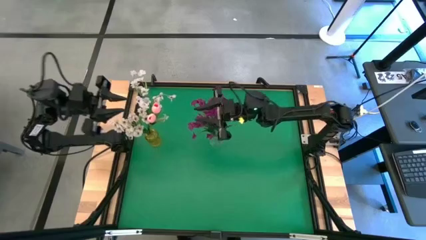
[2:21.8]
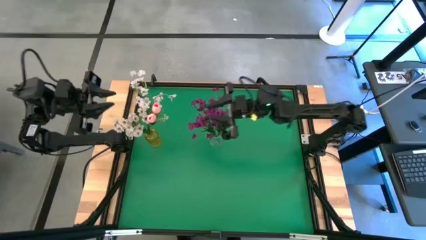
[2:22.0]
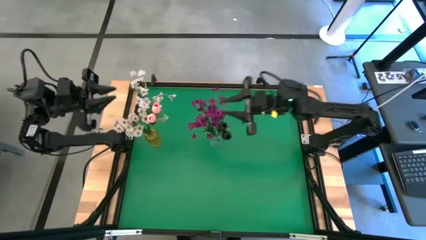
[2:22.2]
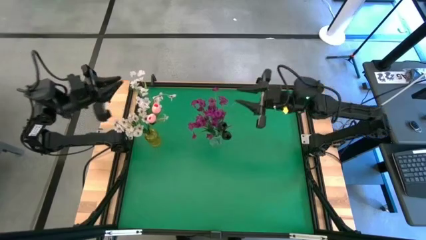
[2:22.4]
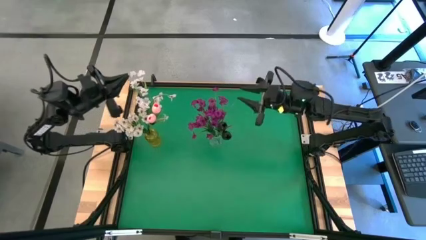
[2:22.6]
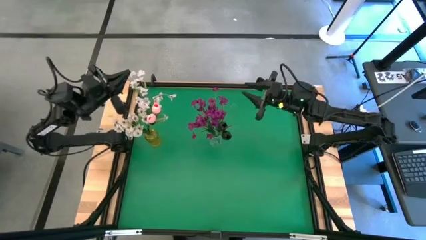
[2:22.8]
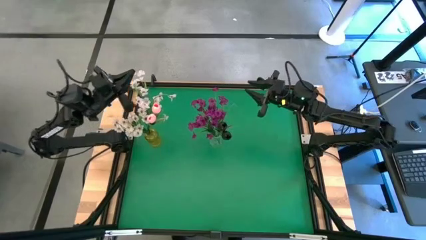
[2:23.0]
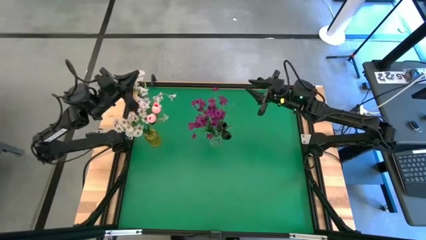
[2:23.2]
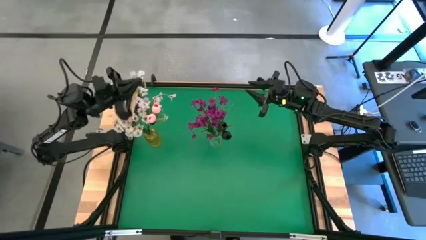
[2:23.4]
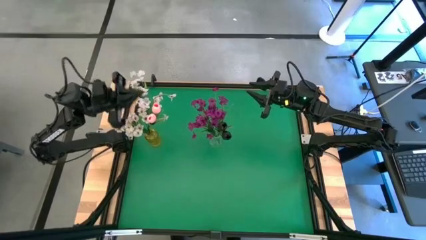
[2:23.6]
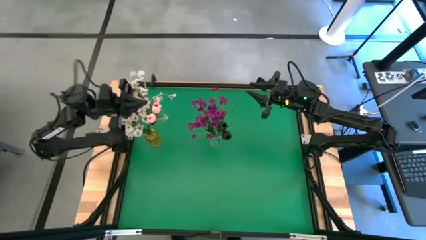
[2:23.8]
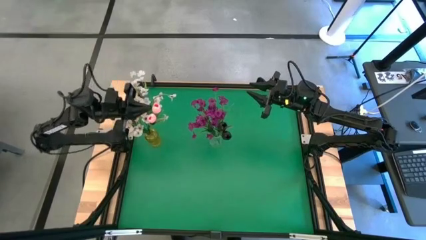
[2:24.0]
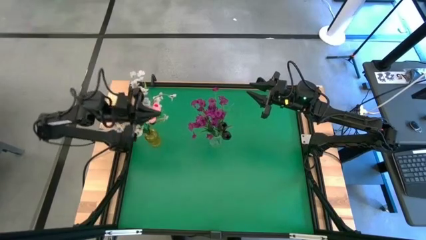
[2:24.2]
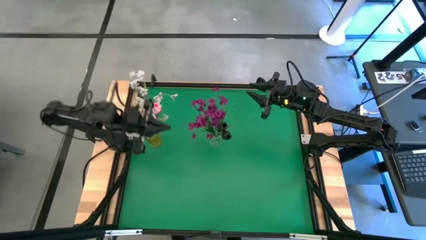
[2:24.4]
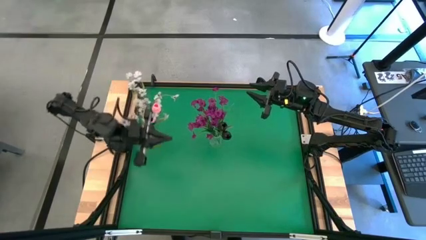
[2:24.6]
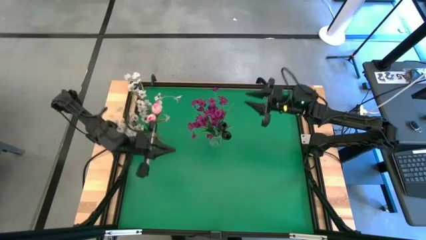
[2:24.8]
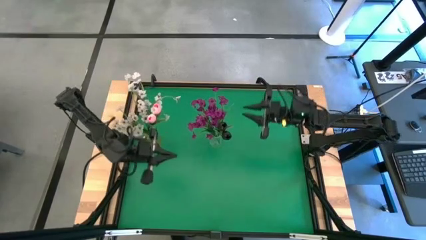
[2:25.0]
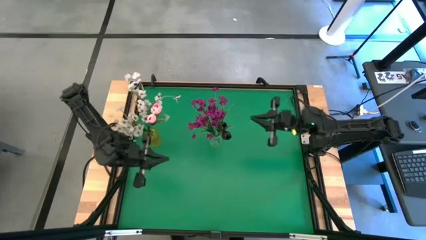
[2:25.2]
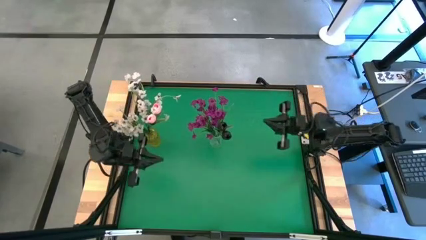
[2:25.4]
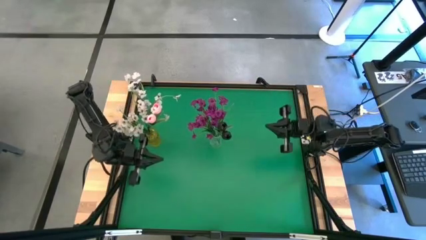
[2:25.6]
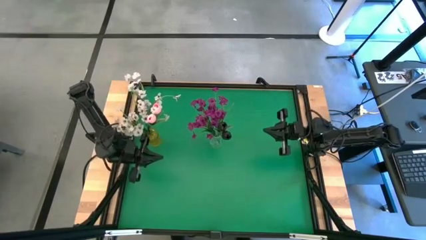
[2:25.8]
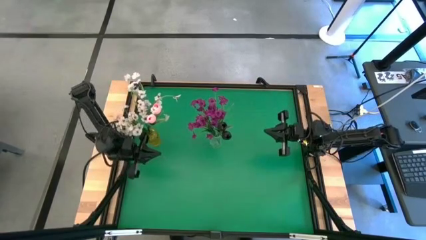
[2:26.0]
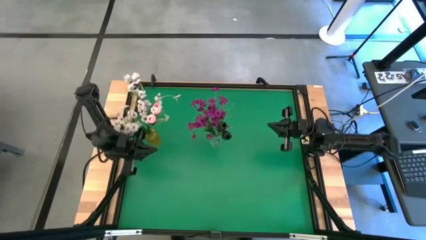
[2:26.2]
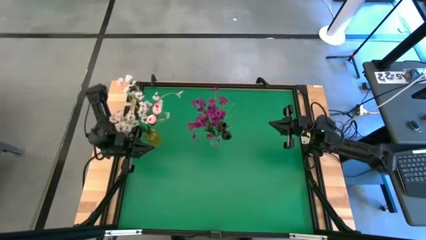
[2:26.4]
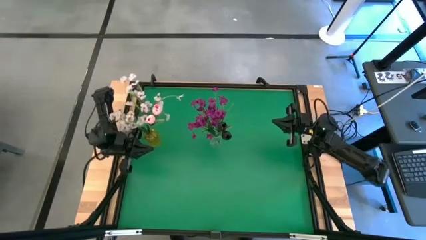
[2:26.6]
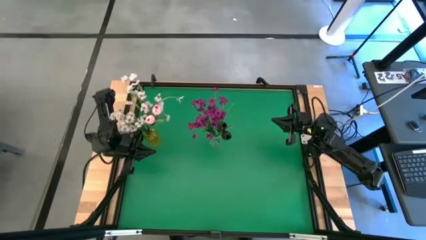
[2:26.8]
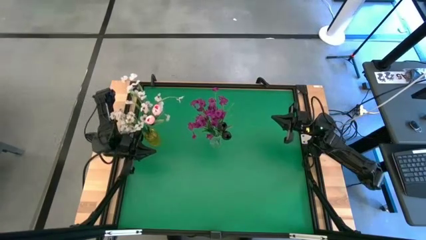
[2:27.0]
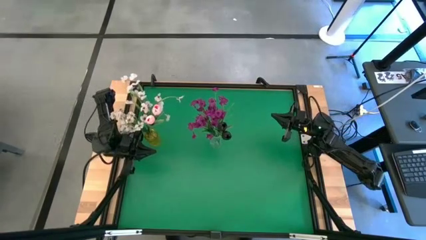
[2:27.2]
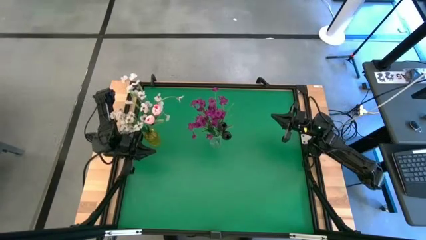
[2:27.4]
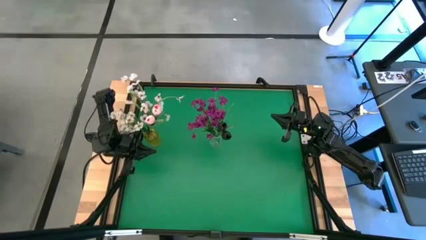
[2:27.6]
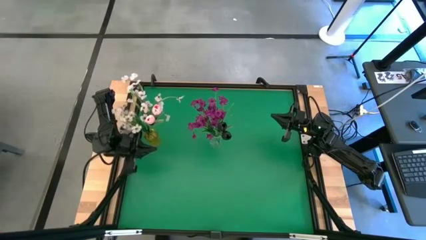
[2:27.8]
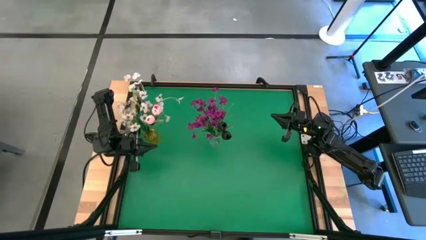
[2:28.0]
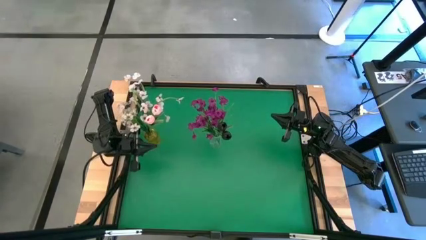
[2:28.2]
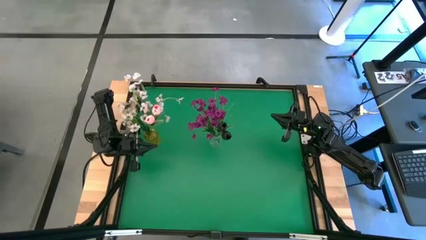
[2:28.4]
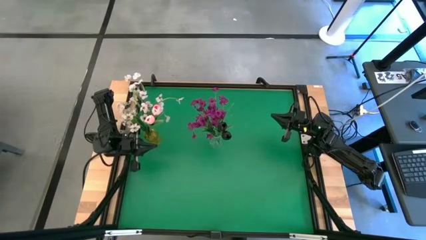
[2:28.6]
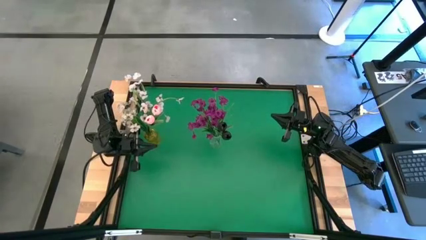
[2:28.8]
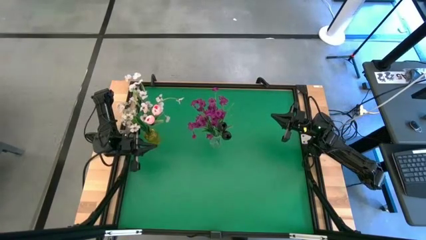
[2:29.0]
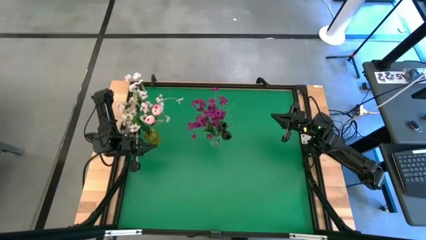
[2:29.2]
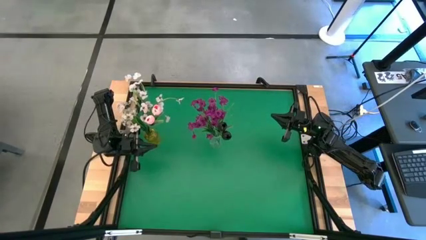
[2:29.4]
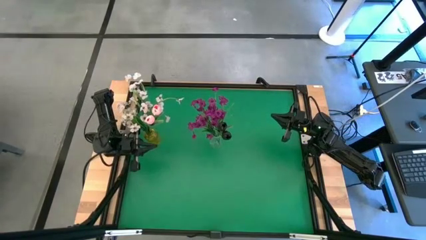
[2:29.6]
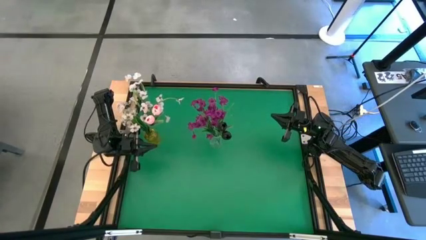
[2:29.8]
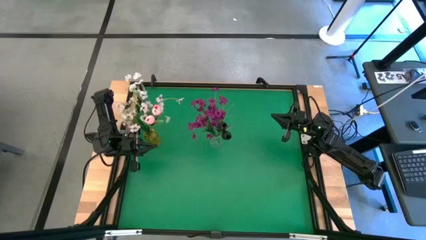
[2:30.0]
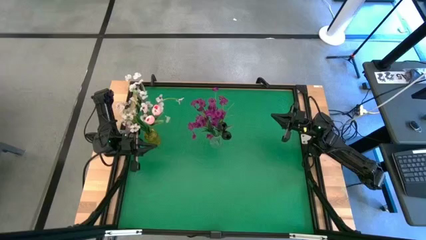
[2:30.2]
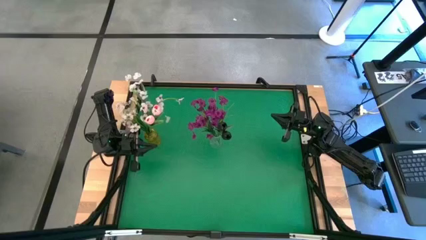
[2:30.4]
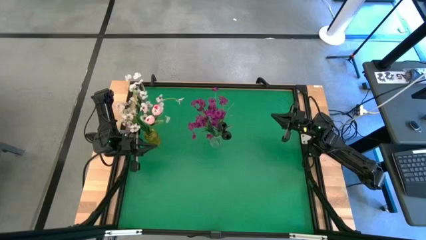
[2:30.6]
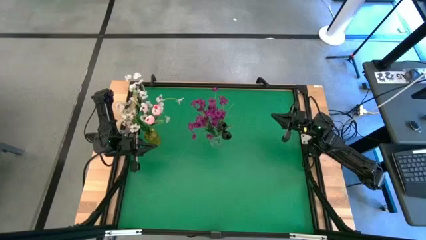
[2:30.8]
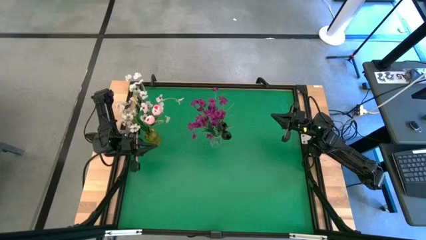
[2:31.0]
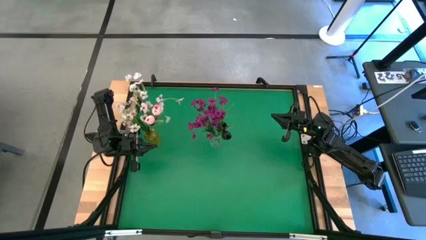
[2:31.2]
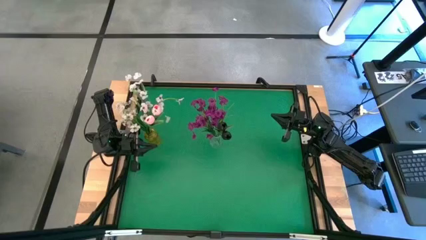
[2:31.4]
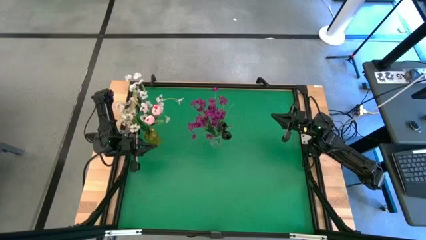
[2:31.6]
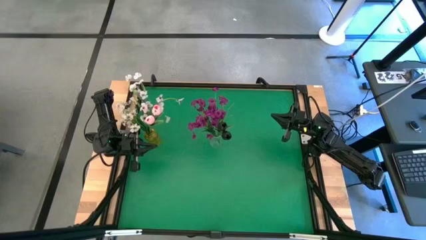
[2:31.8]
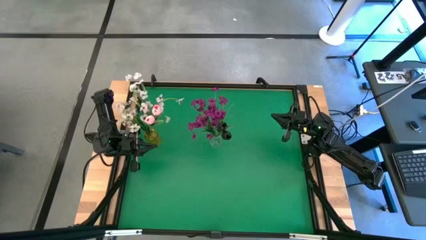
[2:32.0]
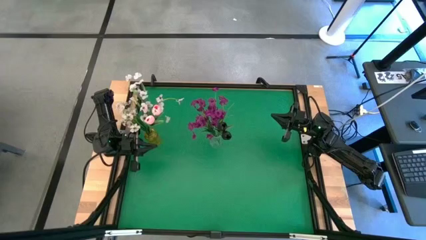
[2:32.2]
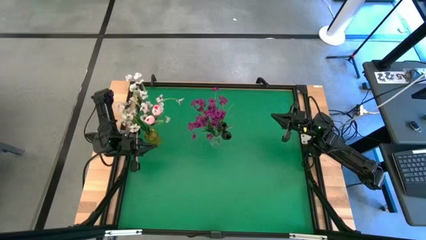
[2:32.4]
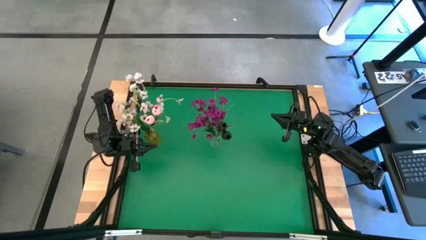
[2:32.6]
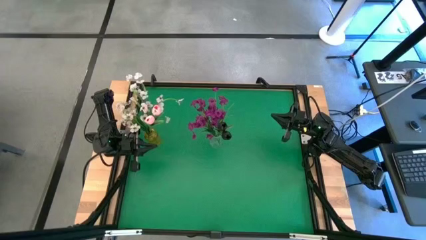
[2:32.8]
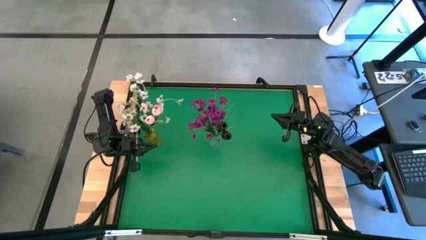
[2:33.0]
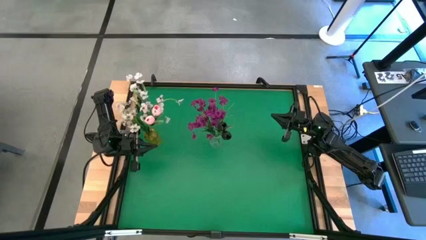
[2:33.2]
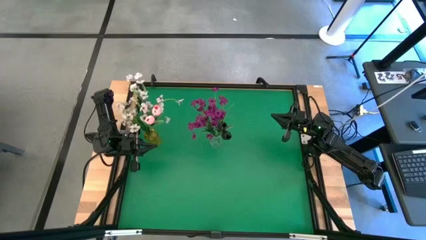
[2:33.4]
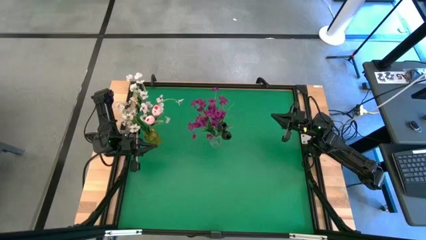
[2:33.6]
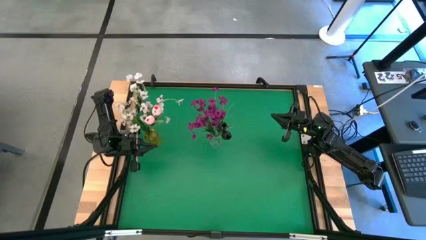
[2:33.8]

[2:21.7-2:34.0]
Task: Sort flowers into vase by color
Return to Home Position

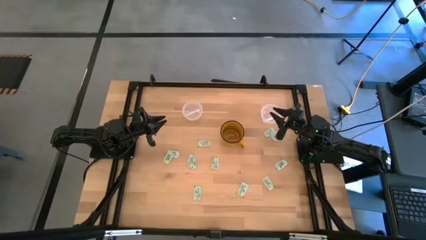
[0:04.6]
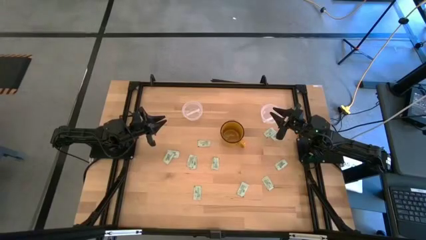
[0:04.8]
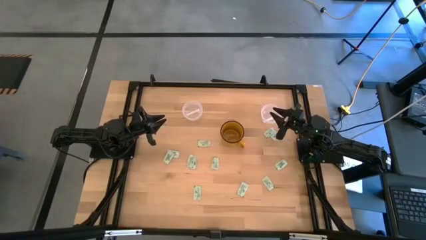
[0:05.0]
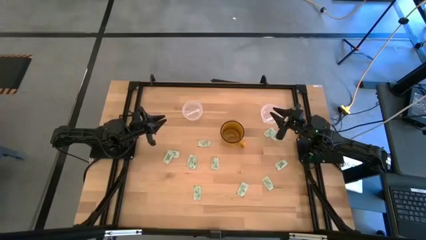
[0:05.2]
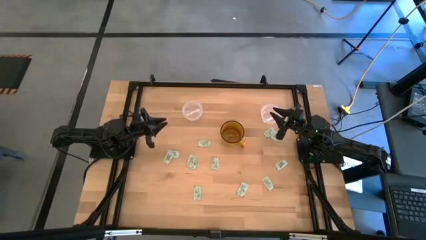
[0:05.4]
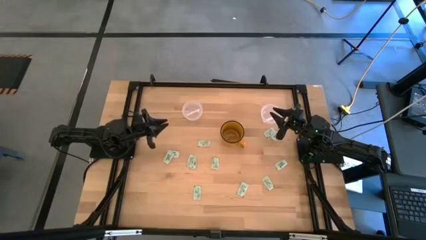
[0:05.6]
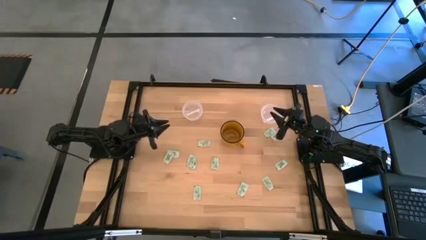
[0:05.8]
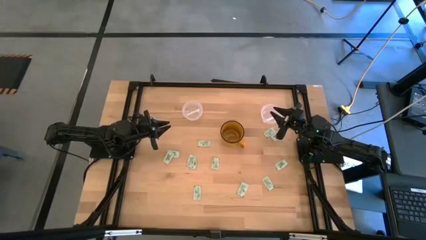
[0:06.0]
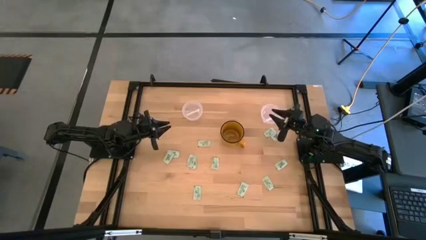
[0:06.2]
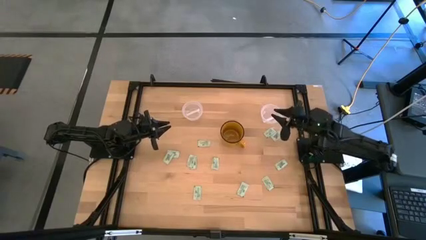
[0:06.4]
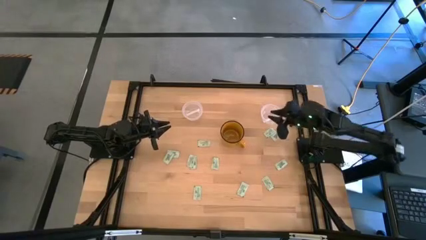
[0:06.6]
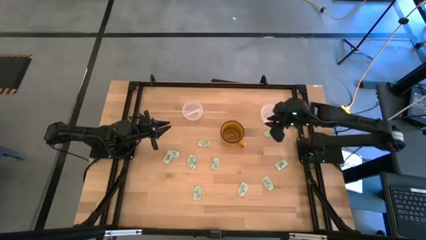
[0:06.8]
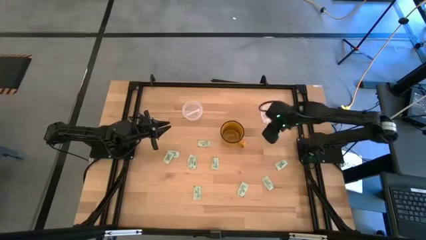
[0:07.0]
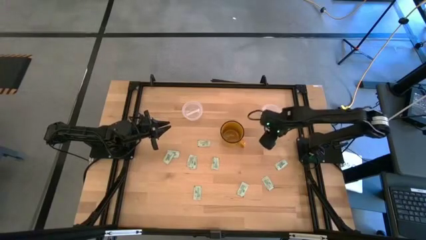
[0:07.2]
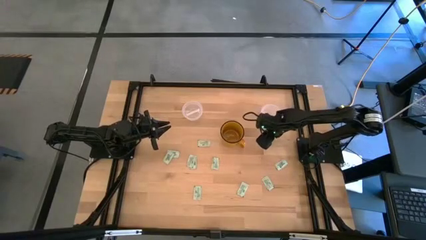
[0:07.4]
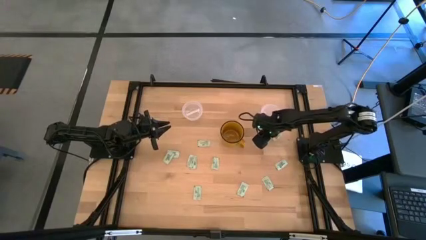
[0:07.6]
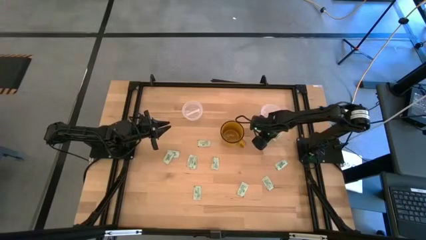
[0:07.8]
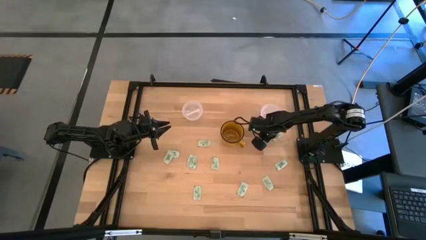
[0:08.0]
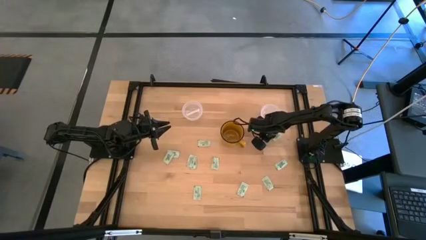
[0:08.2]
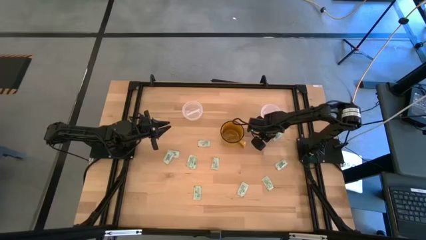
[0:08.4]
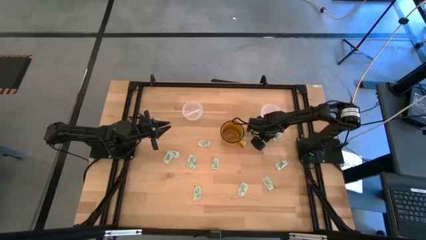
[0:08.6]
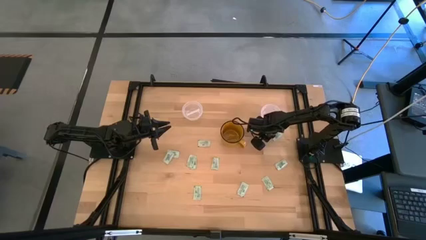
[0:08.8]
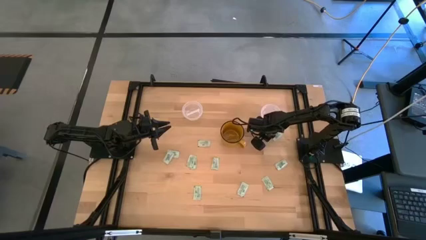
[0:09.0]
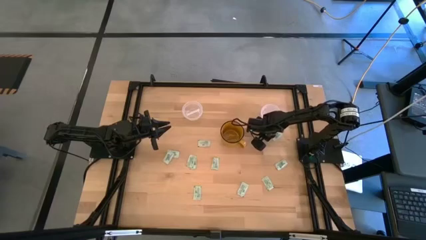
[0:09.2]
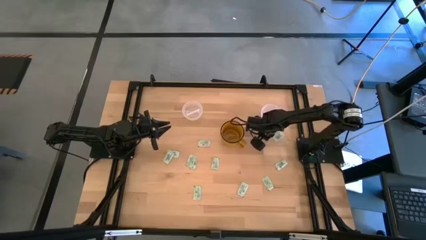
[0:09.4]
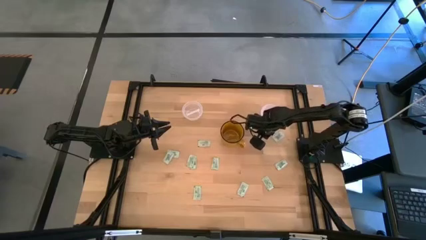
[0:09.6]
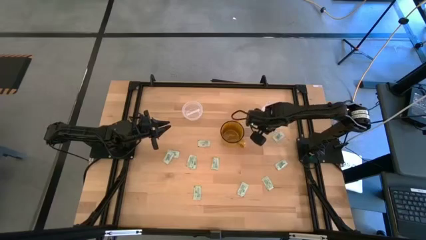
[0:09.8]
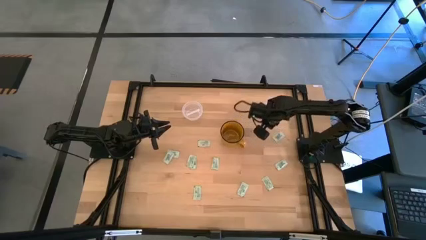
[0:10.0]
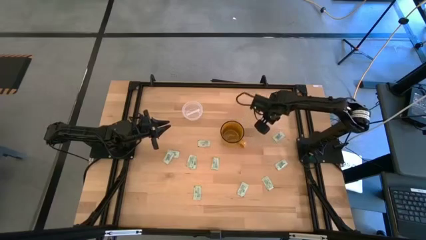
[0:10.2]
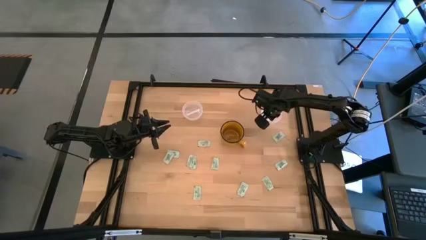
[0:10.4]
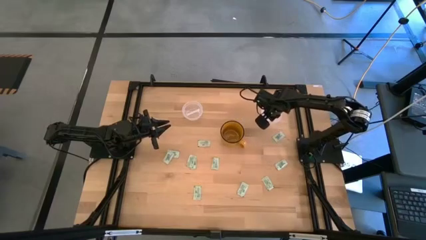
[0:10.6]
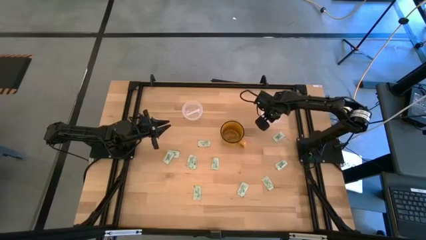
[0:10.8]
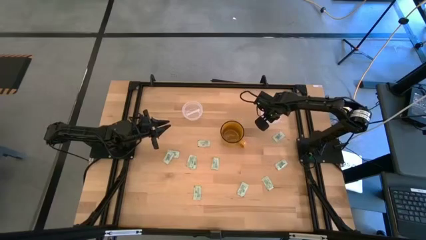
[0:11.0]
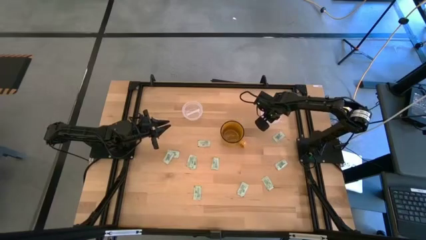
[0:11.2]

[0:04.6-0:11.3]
Task: Pick and place Stevia / Truvia into bins
Put the white stevia packet into the right transparent container
